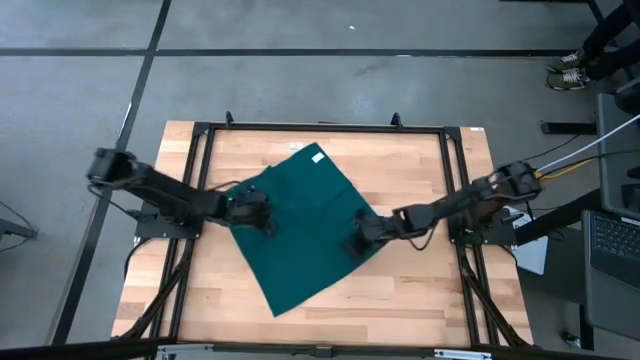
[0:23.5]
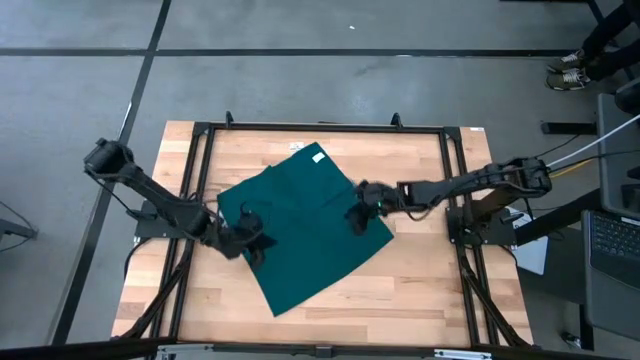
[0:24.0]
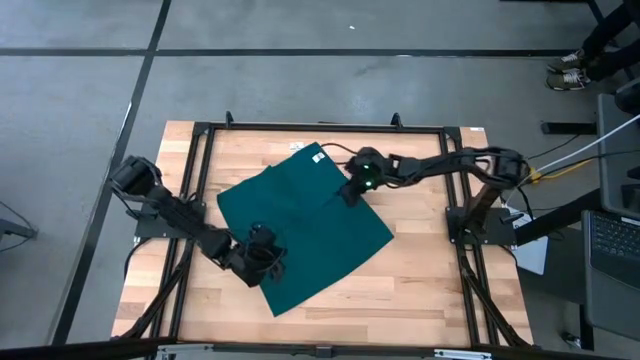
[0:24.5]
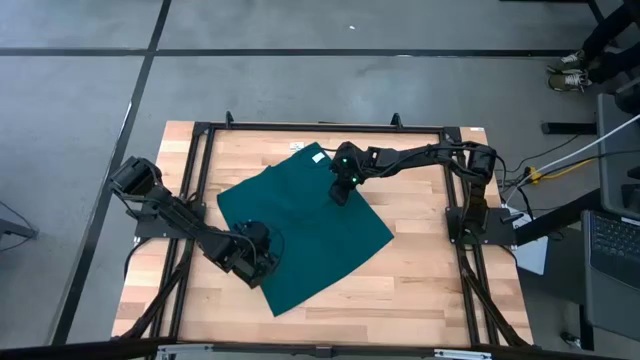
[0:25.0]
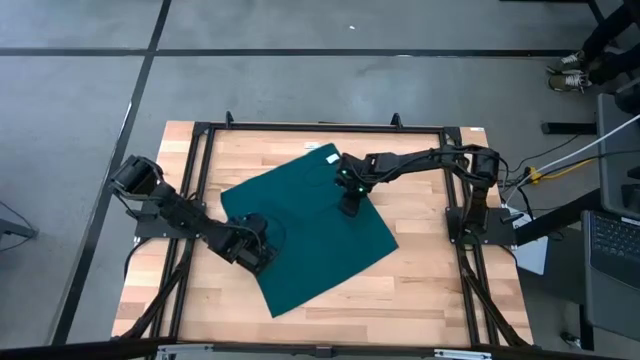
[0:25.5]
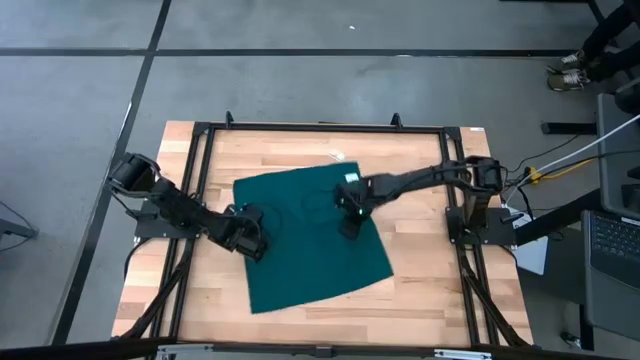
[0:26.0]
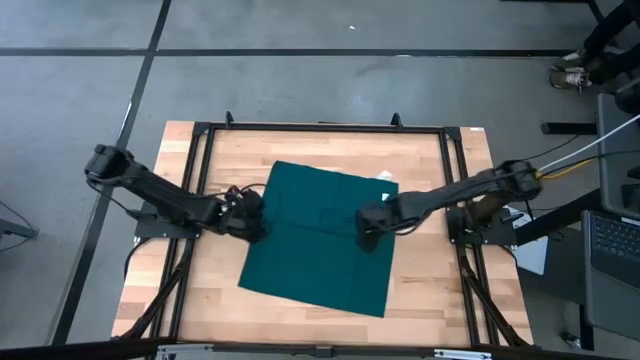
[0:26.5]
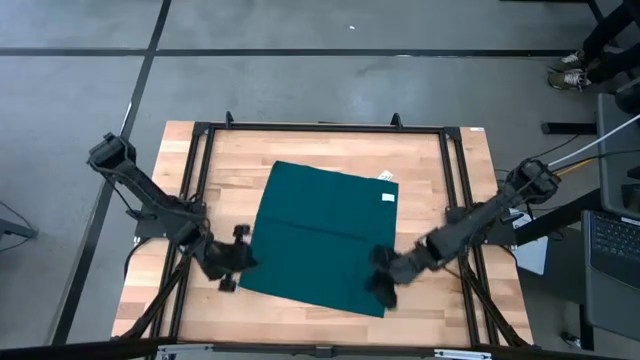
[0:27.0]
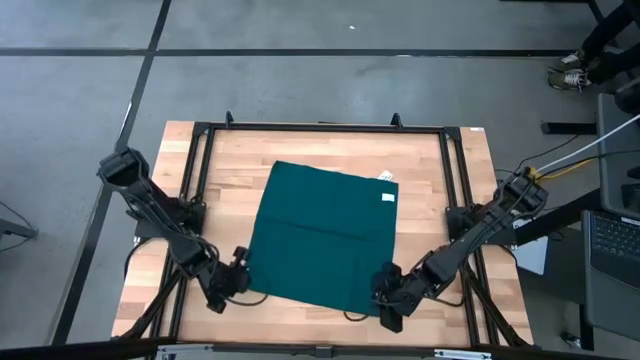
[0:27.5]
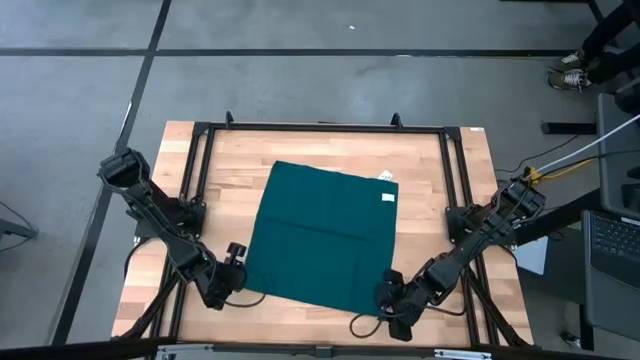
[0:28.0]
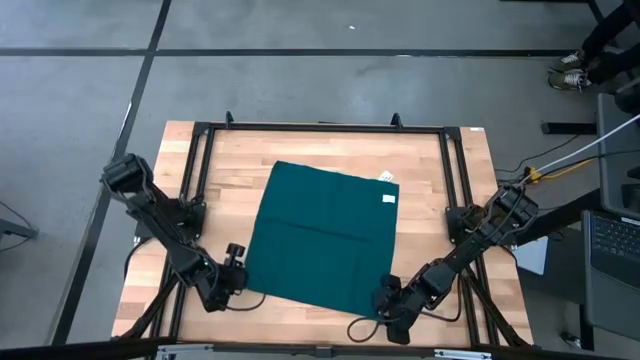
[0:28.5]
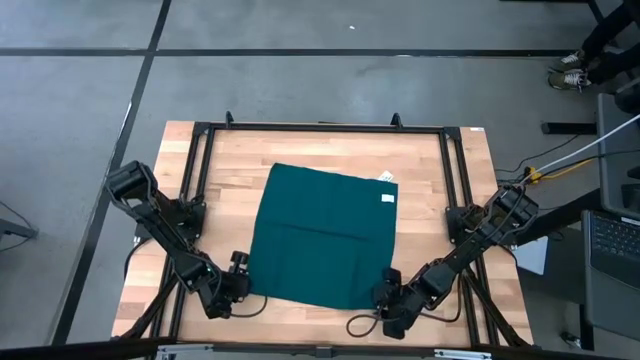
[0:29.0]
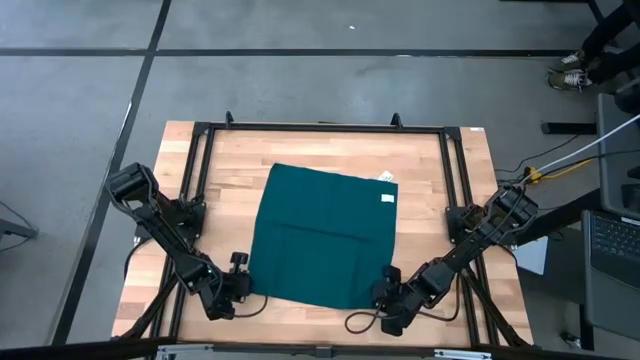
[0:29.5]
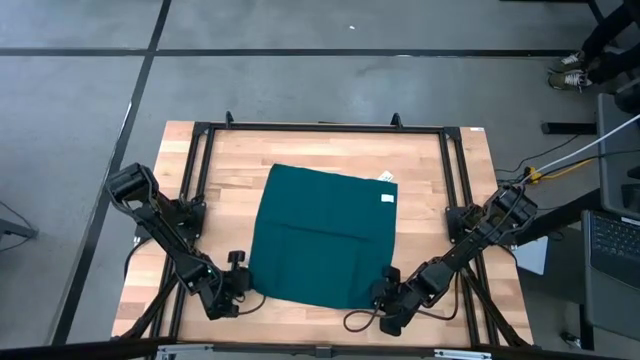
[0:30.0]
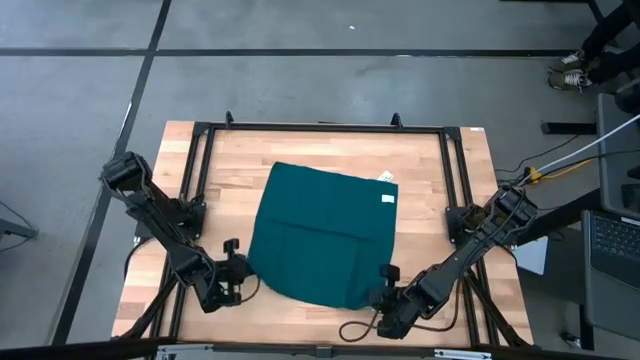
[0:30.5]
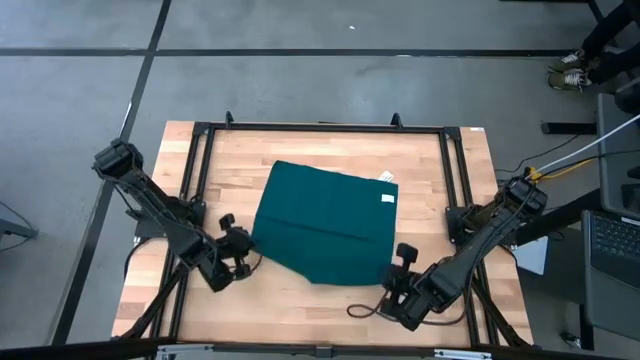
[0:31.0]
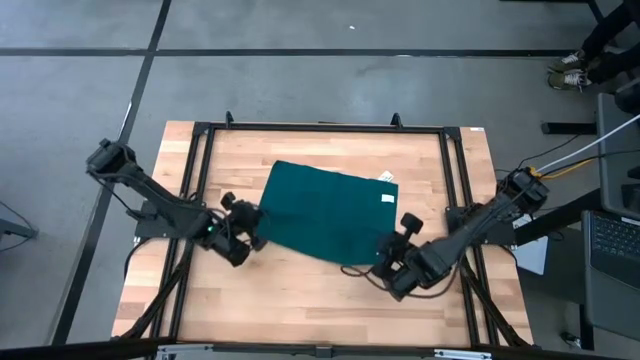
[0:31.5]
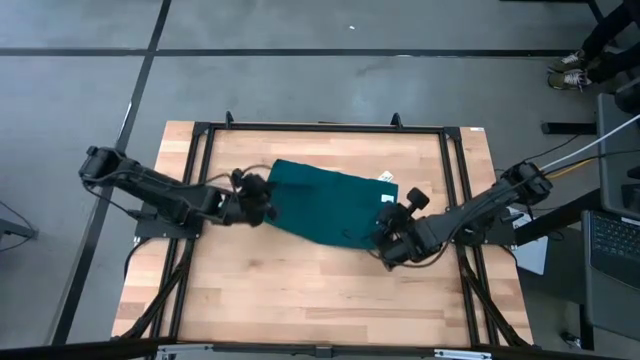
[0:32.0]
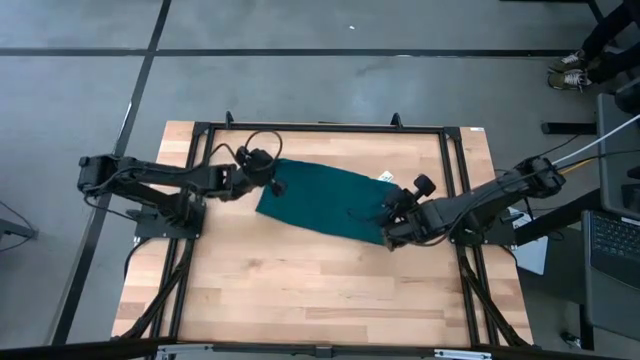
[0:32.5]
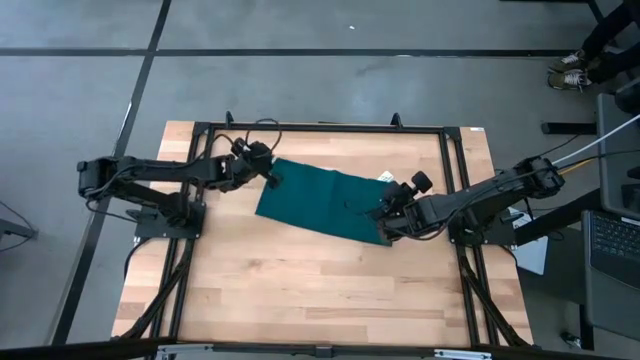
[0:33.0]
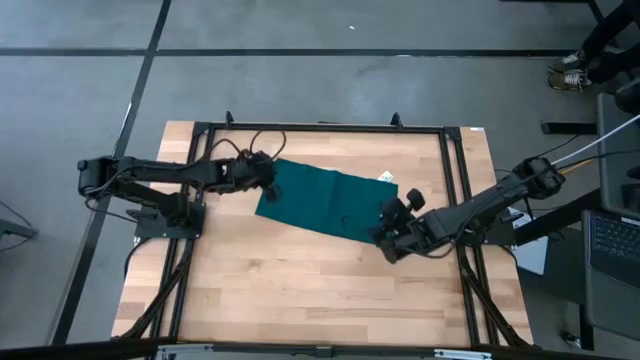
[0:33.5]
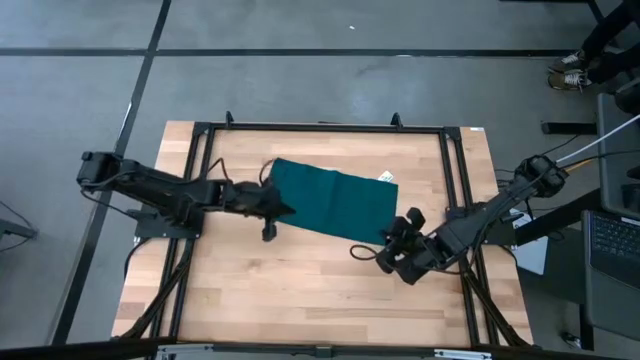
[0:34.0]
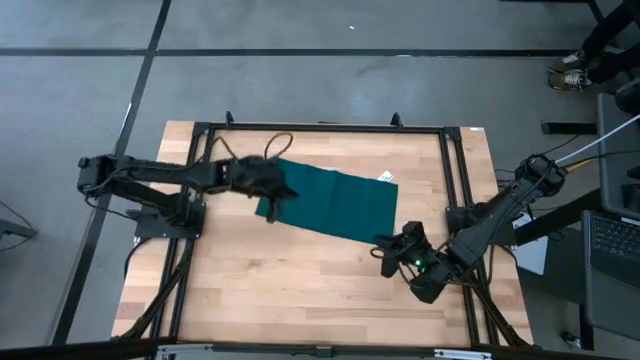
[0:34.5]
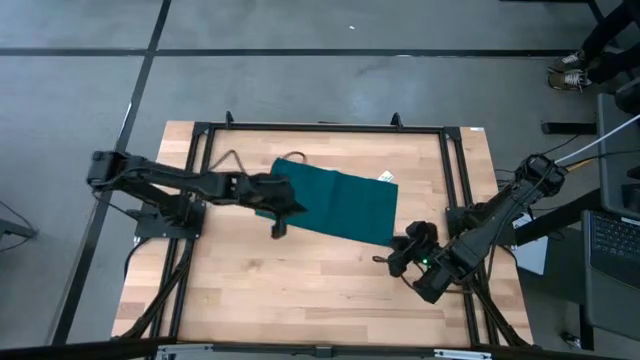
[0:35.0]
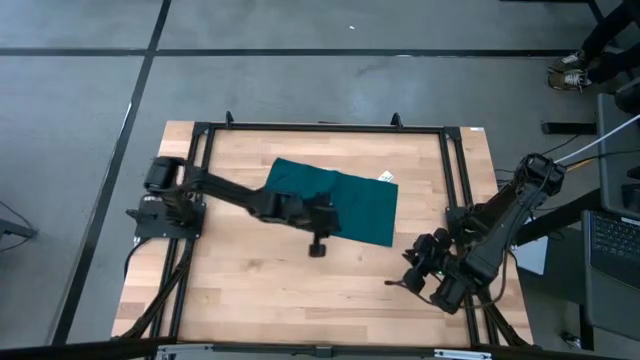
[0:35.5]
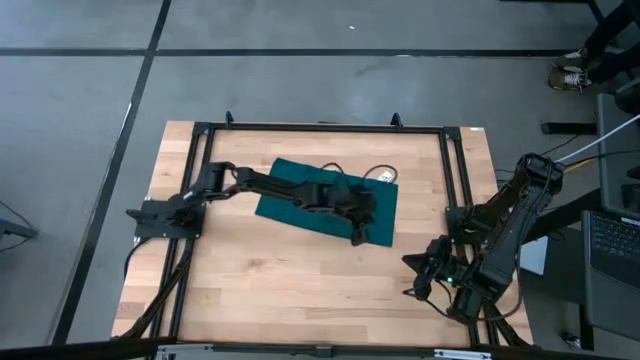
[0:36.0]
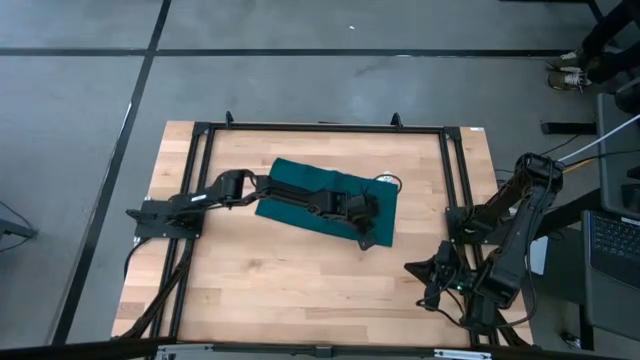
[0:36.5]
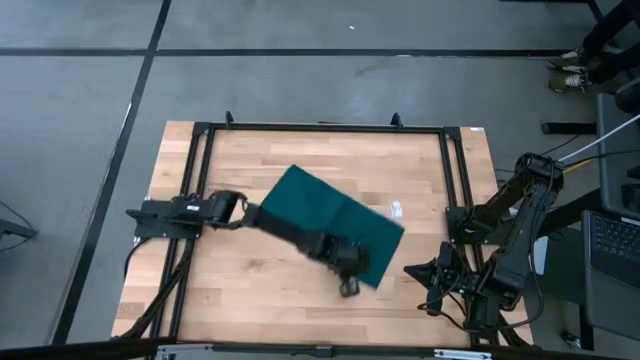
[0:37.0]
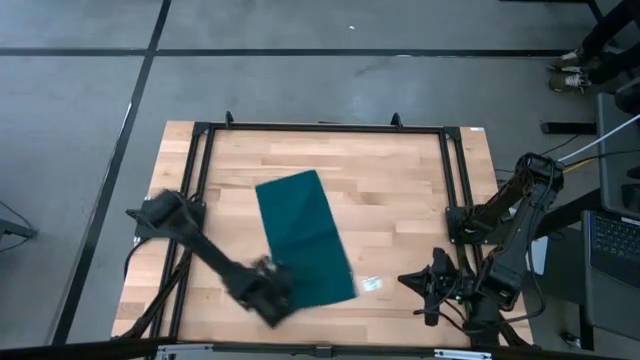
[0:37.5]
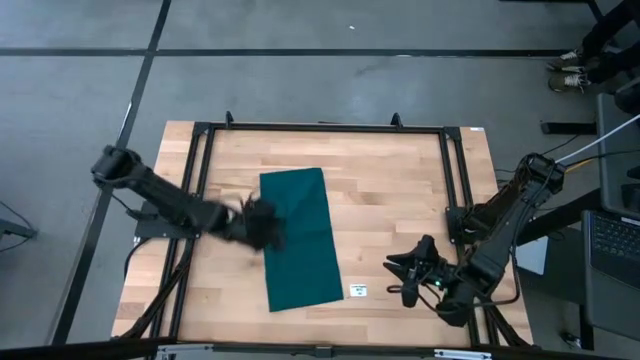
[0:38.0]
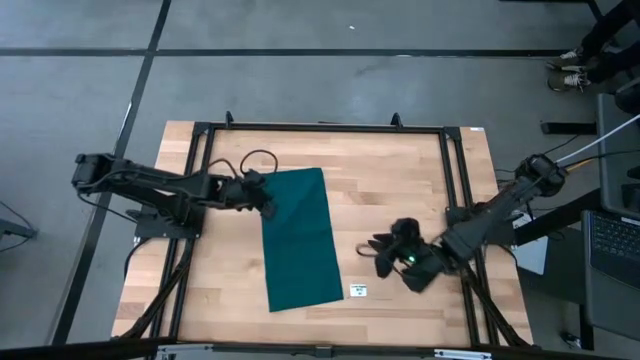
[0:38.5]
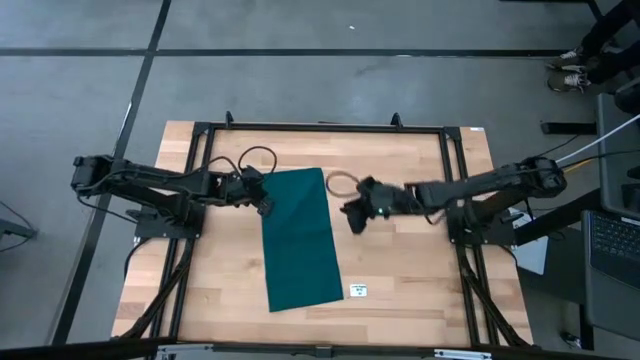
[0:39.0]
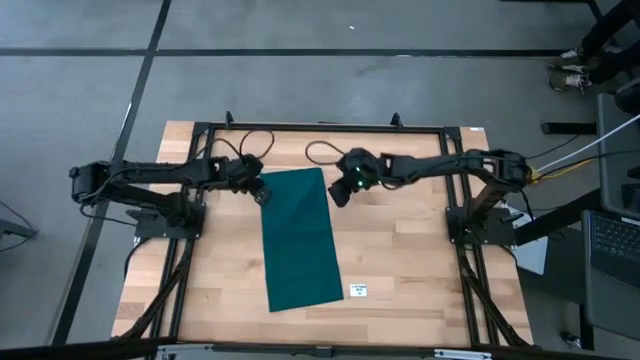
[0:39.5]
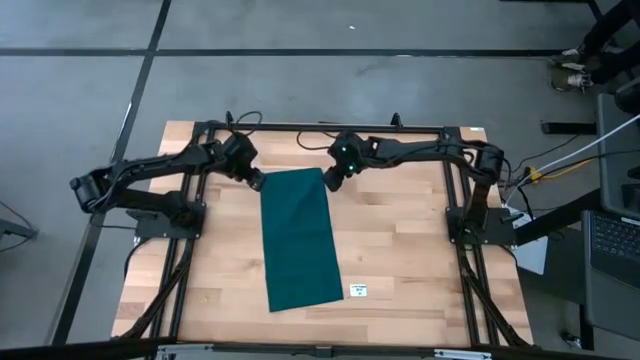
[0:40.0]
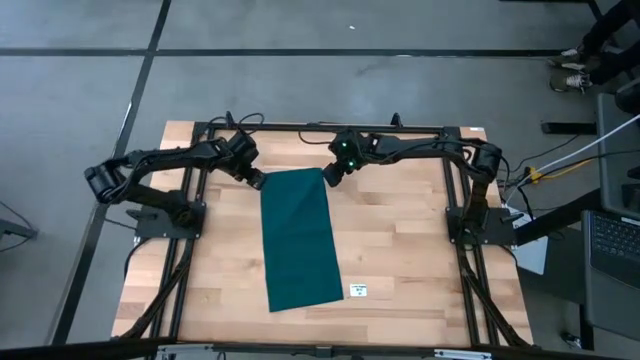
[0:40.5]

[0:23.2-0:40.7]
Task: Fold microfiber towels
Fold the blue napkin
